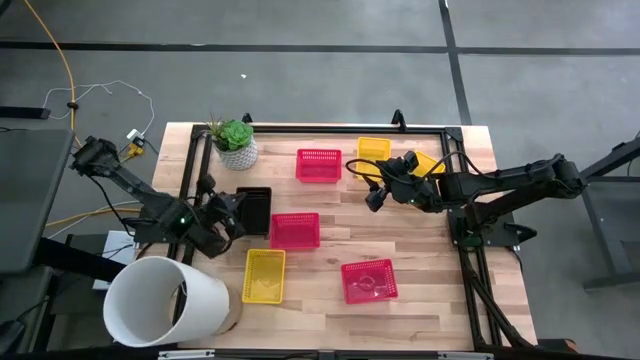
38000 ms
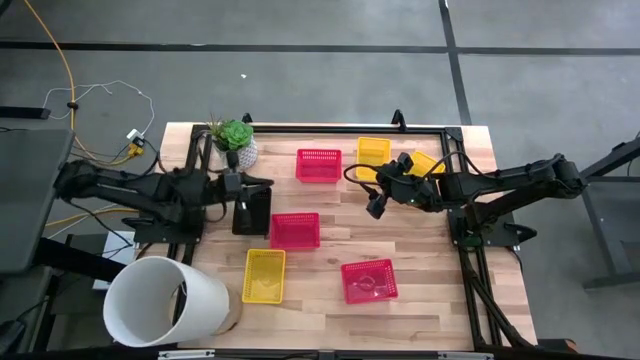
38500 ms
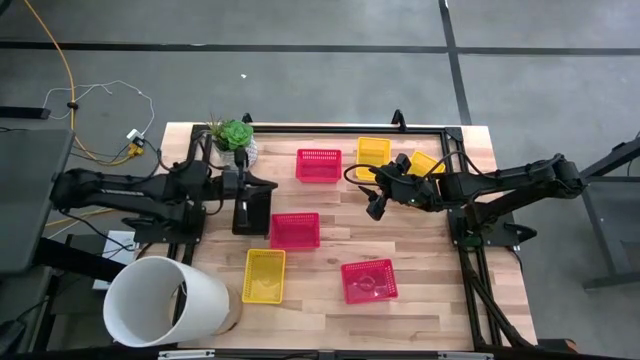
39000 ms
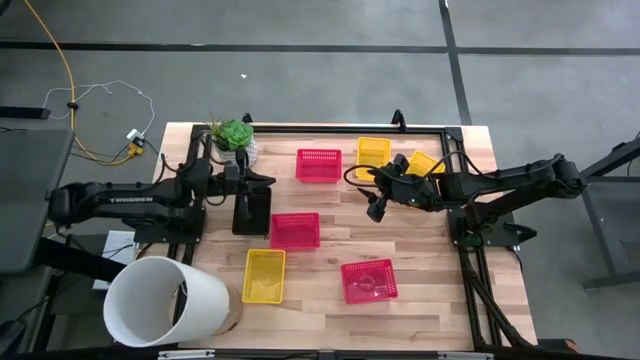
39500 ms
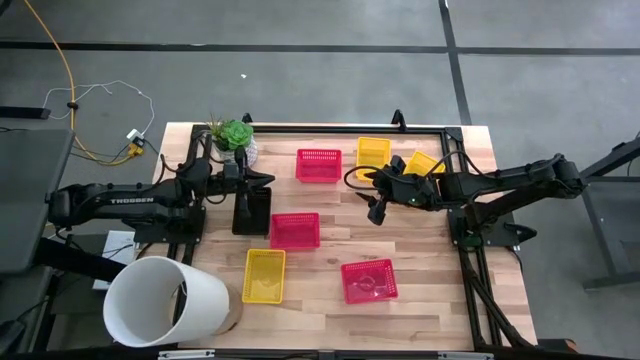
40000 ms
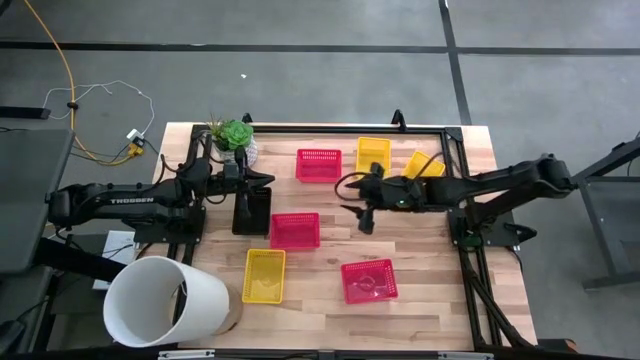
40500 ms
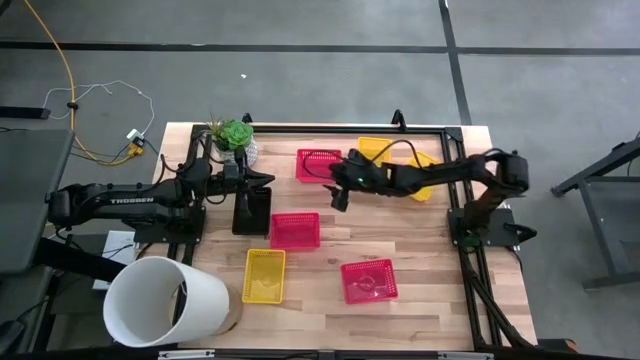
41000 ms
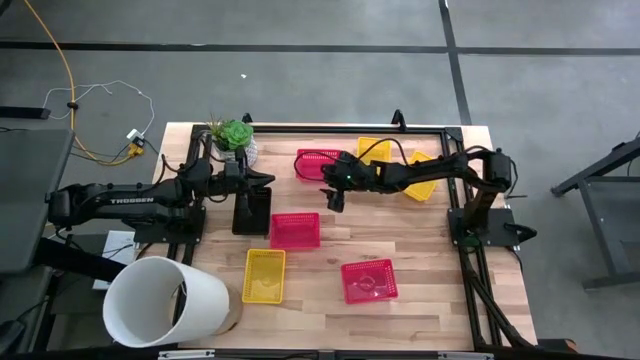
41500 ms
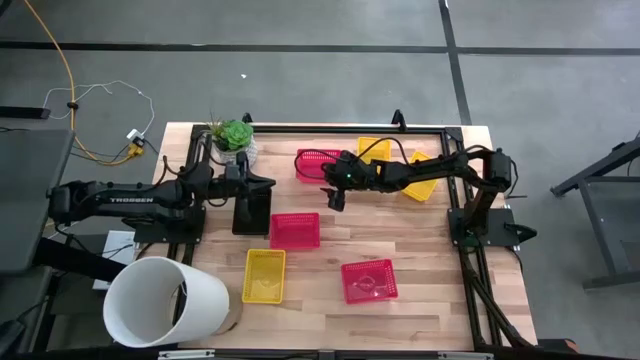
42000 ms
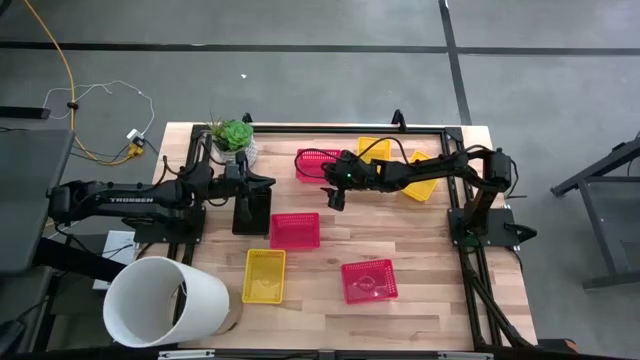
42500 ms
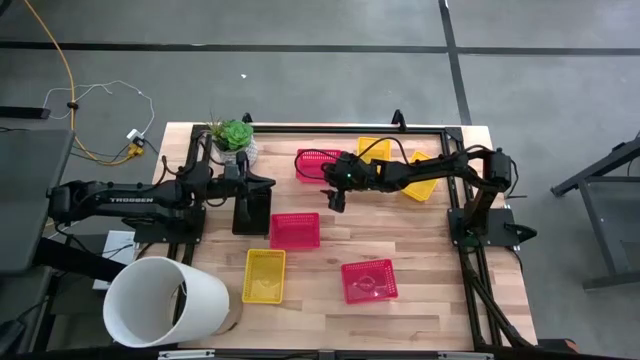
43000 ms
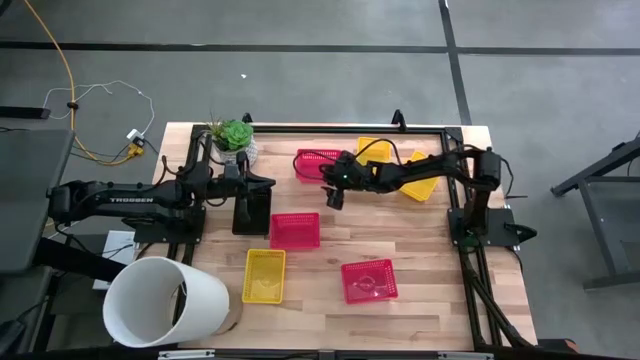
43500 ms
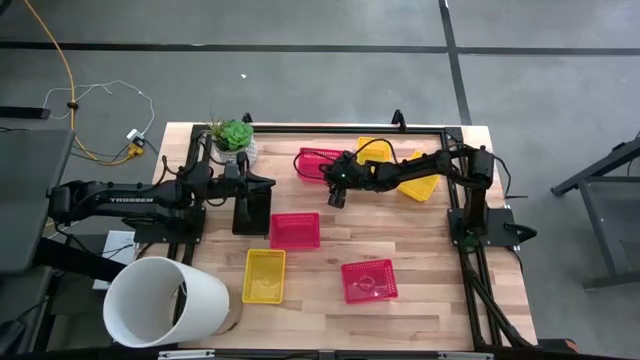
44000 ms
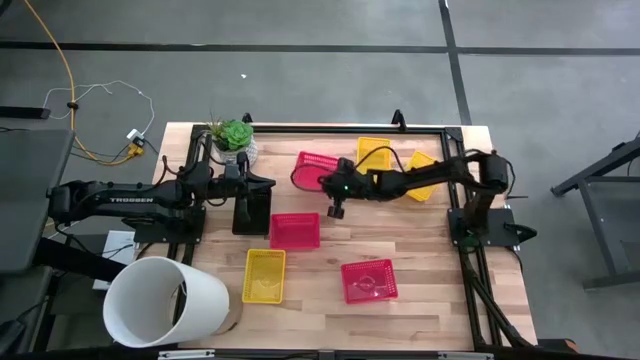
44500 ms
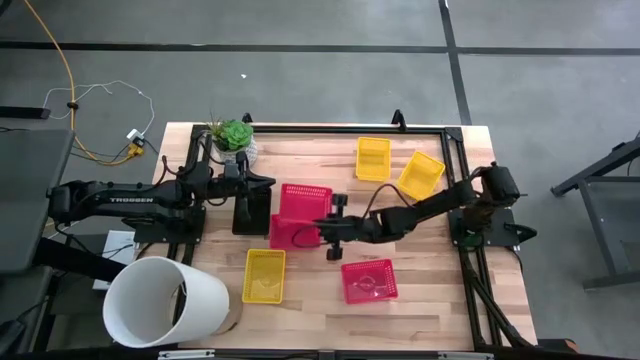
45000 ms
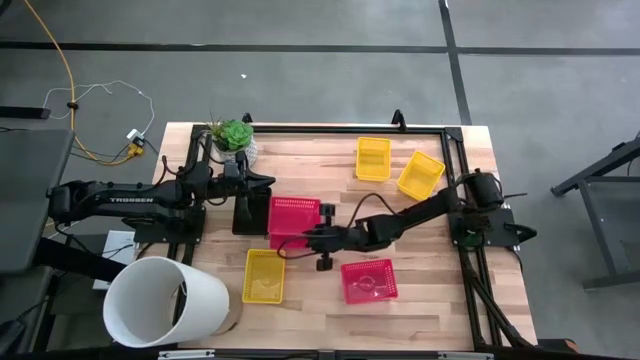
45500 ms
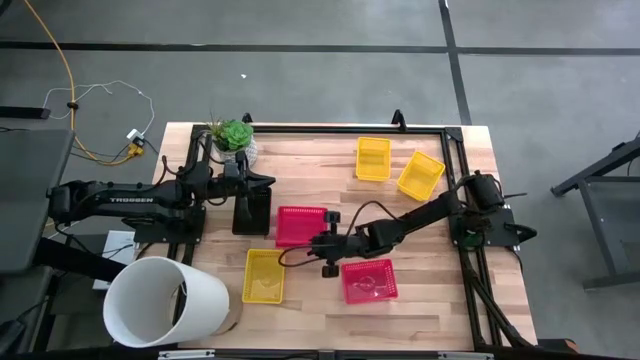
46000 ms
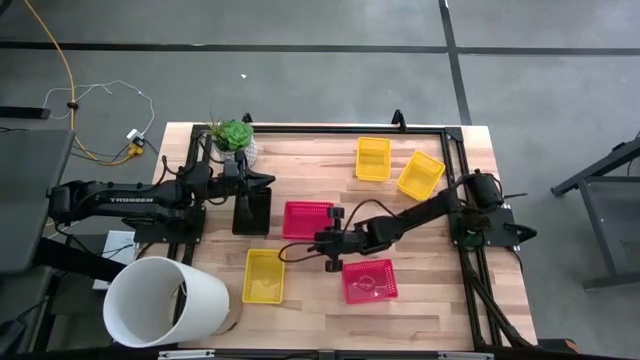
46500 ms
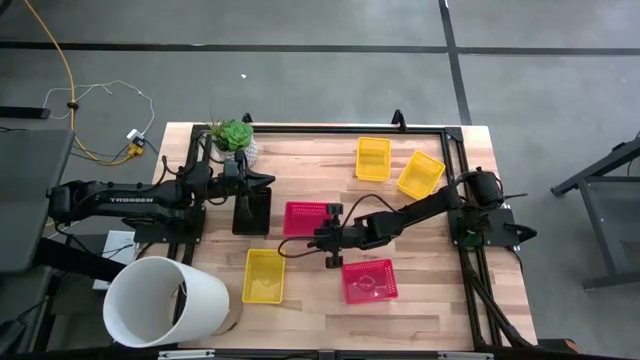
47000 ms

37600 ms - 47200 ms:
Stack the top red bin on top of the left red bin

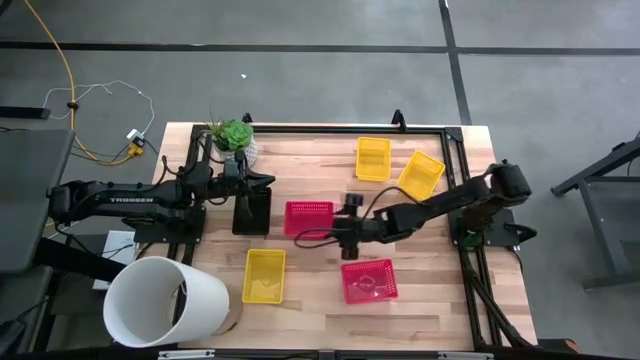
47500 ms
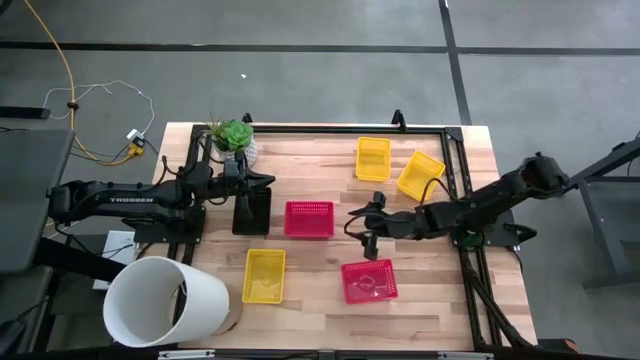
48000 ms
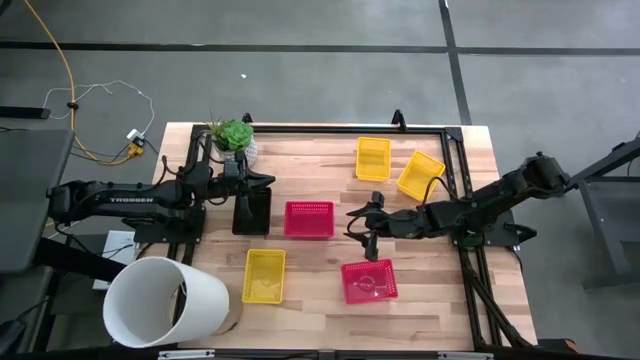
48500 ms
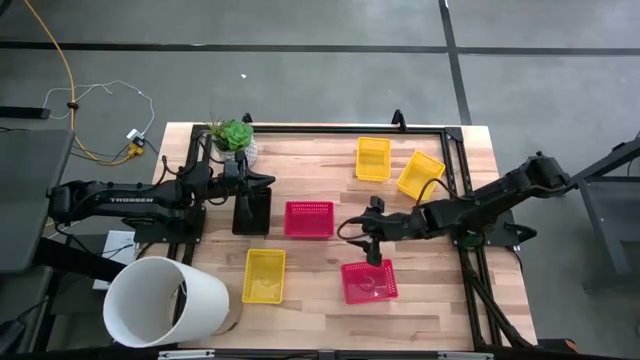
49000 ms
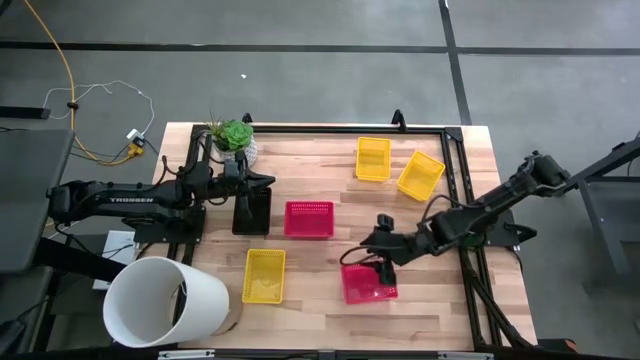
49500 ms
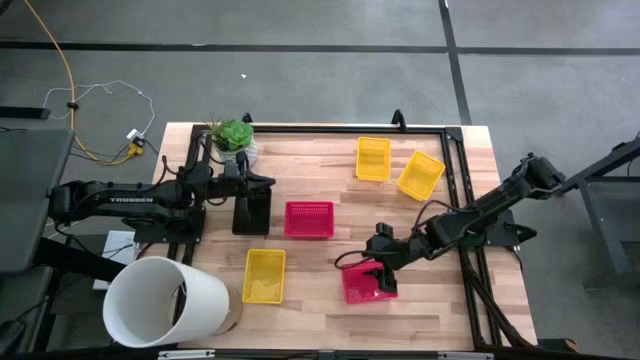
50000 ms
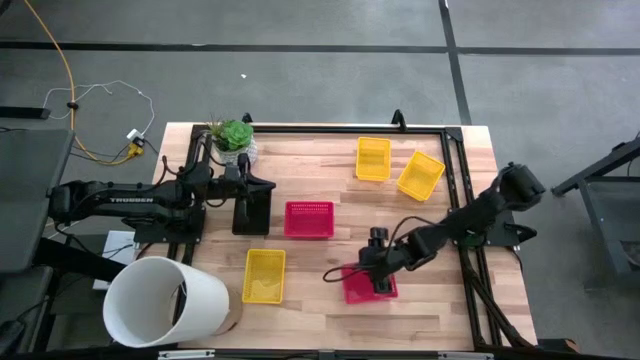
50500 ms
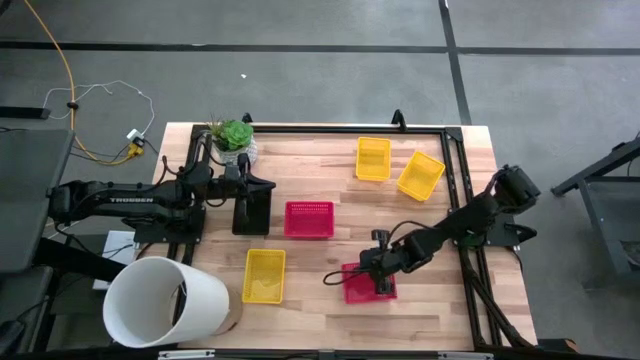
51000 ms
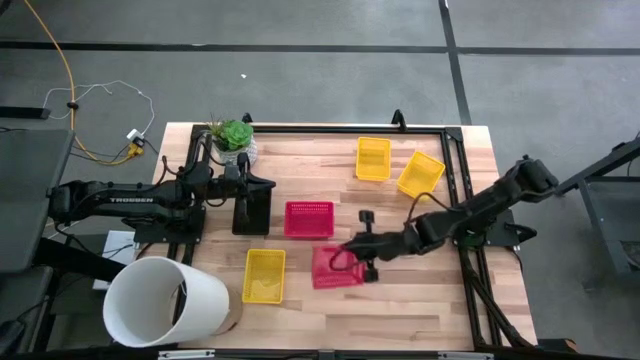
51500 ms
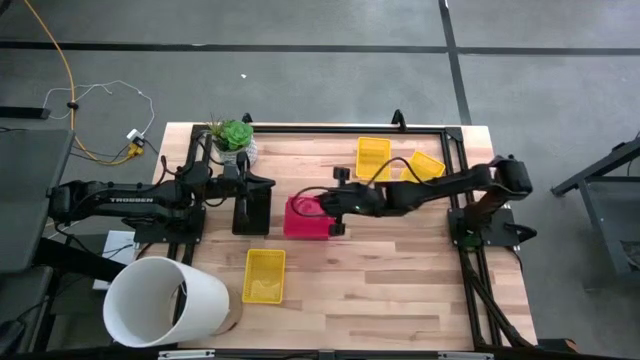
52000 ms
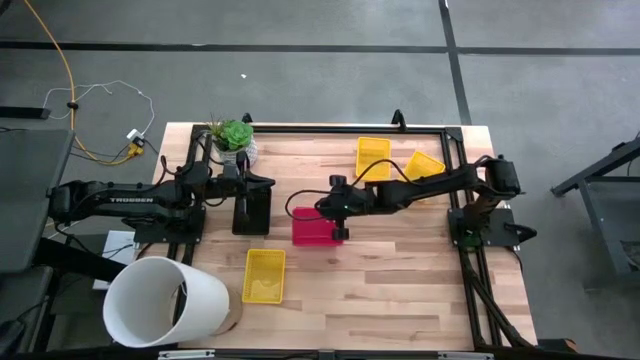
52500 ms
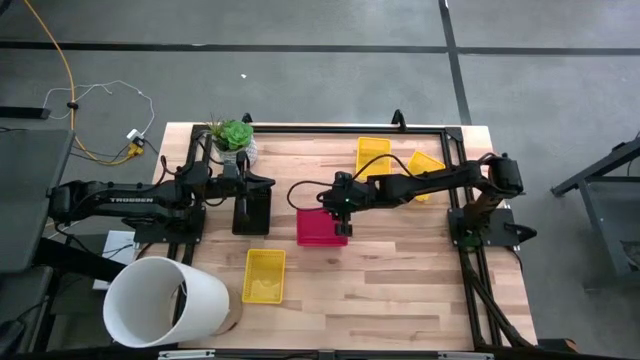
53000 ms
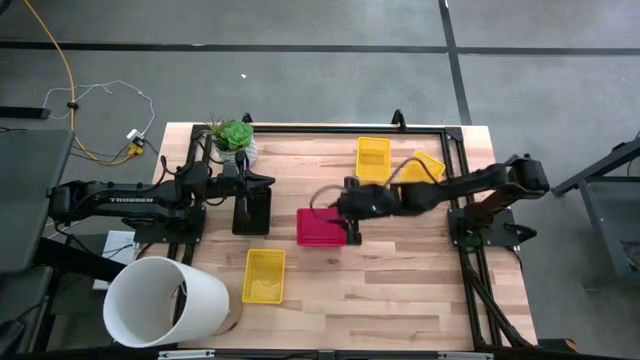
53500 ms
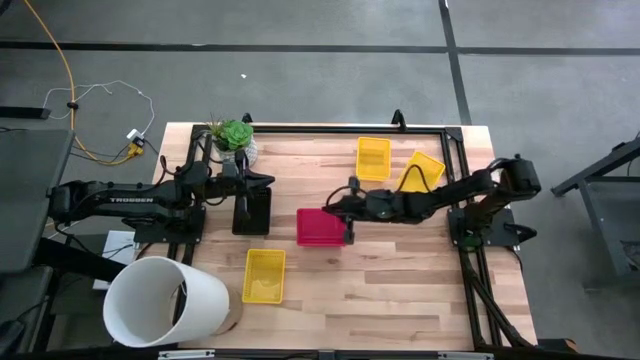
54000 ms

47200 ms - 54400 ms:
Stack the bottom red bin on top of the top red bins

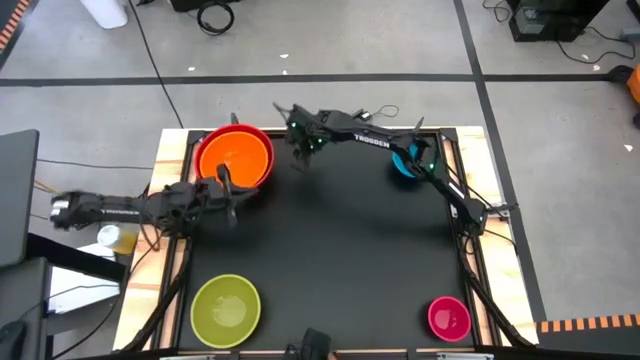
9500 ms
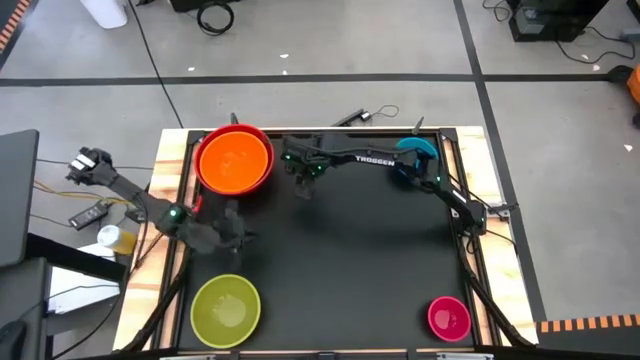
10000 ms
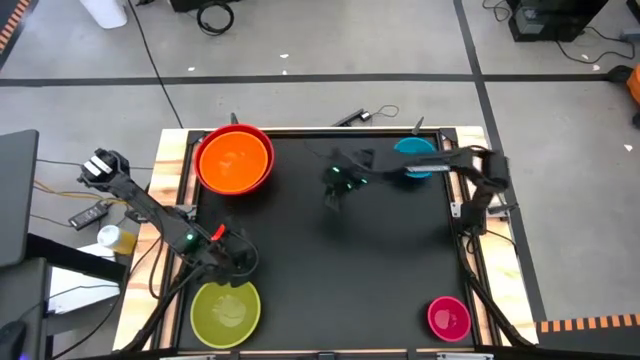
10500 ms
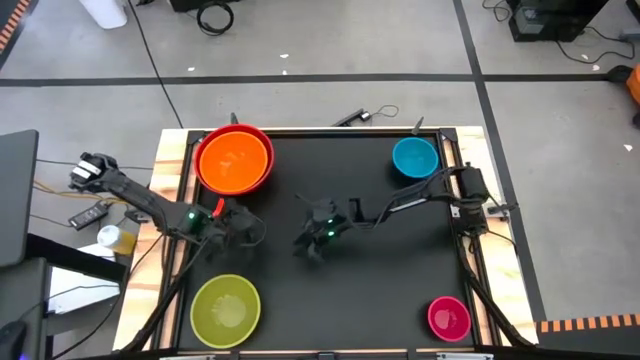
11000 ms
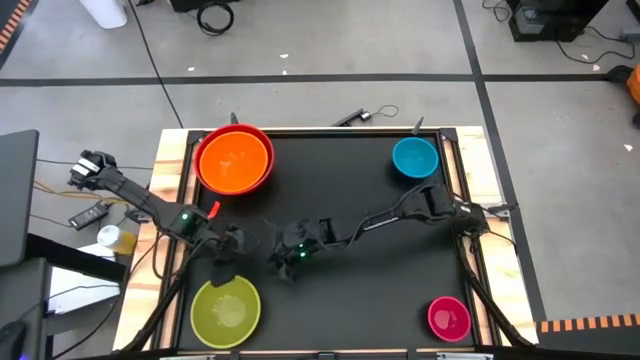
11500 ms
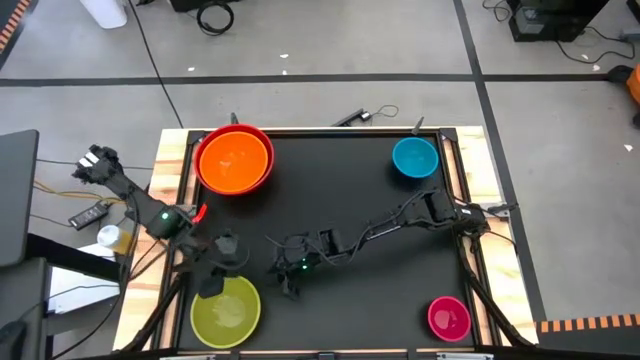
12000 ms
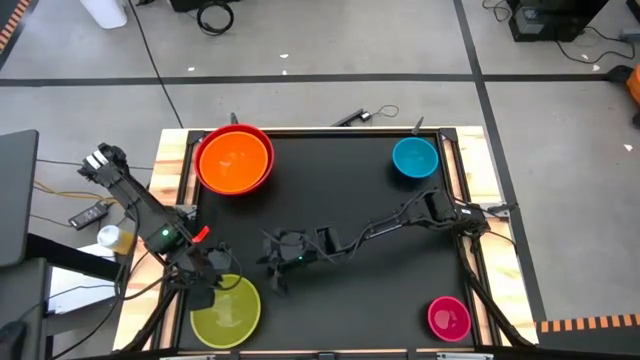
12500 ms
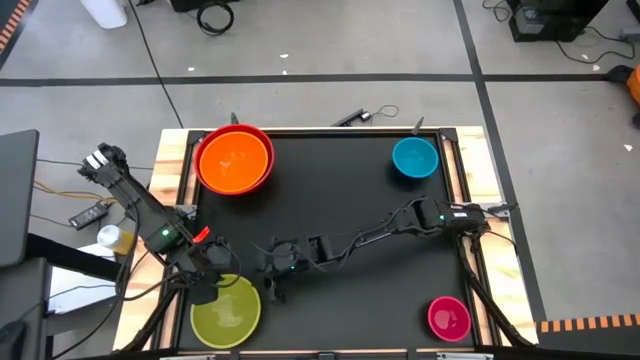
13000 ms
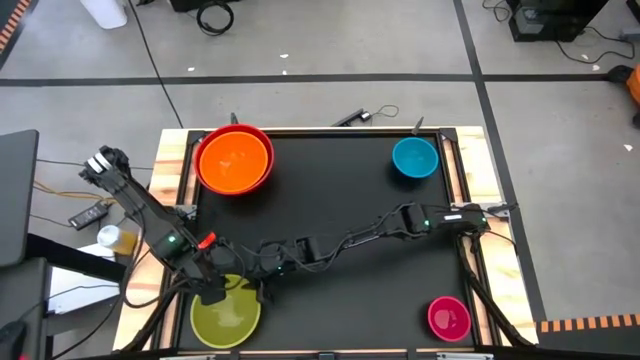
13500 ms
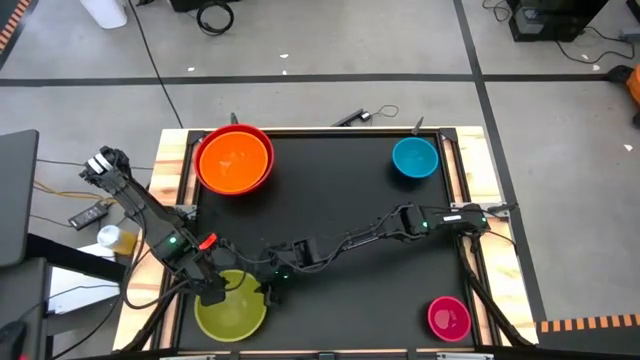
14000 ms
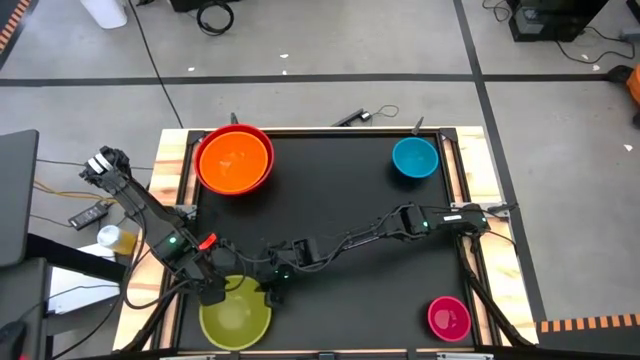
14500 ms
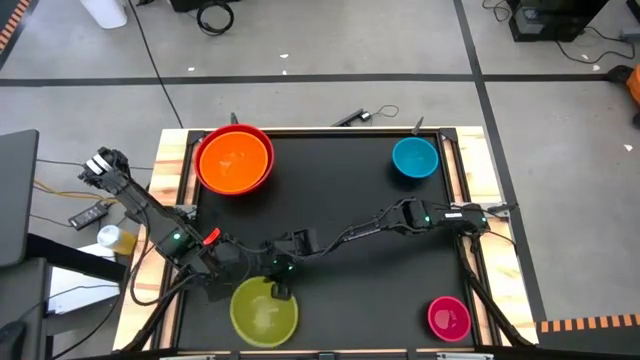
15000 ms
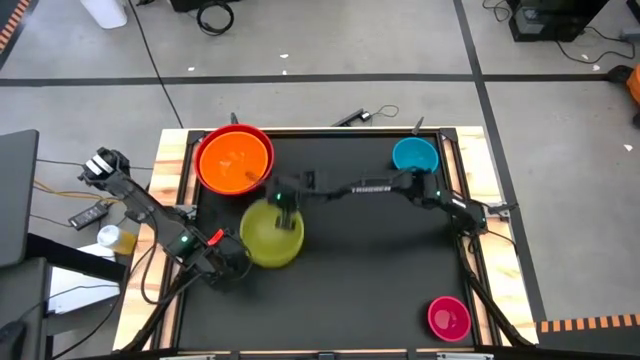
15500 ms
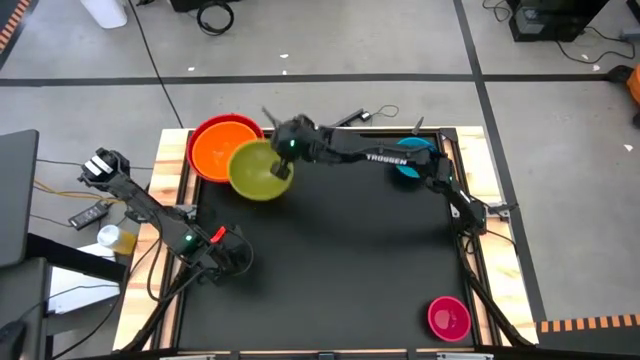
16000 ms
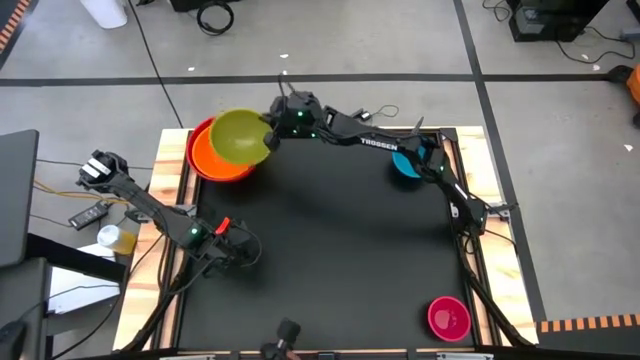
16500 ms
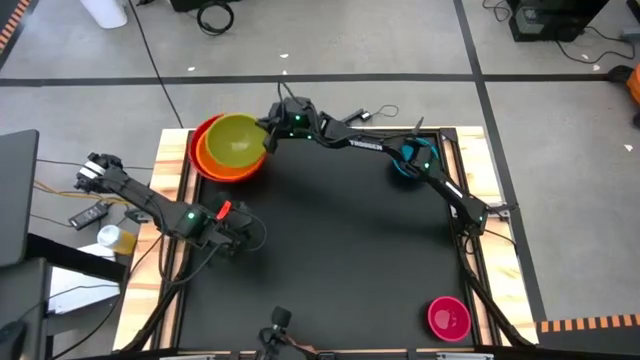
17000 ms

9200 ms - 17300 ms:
Stack the green bowl on top of the orange bowl
